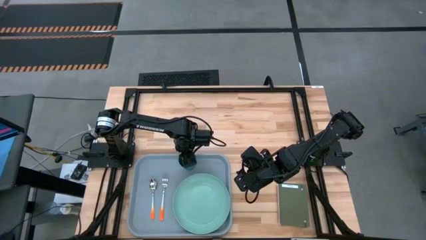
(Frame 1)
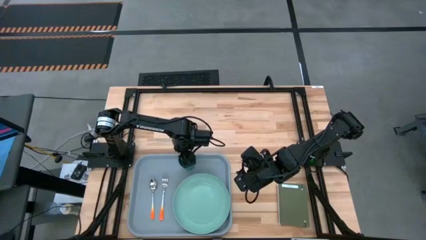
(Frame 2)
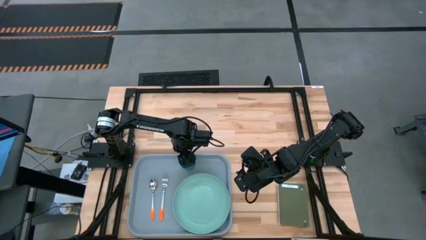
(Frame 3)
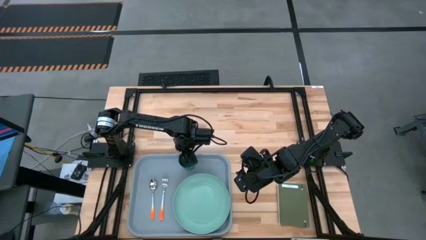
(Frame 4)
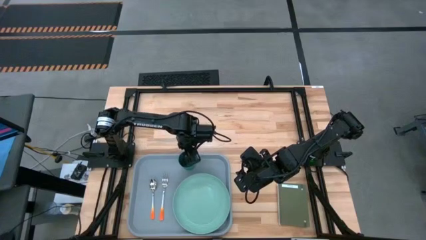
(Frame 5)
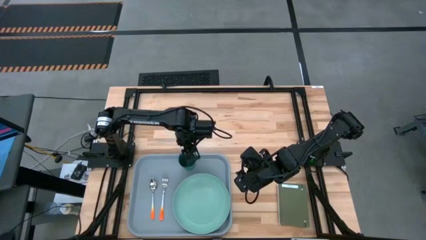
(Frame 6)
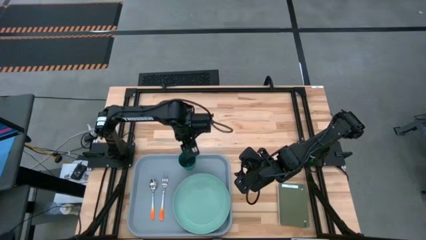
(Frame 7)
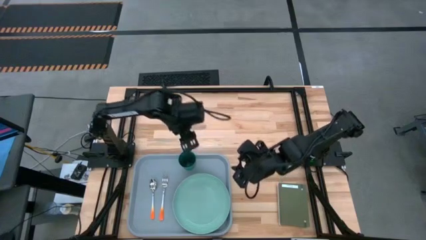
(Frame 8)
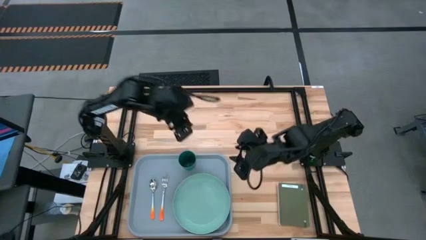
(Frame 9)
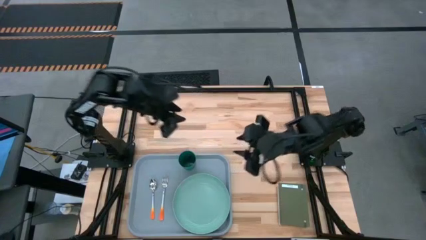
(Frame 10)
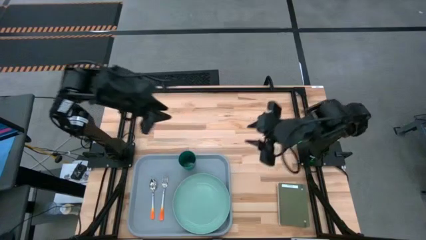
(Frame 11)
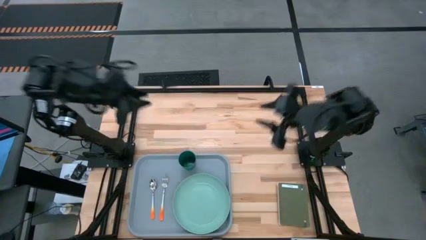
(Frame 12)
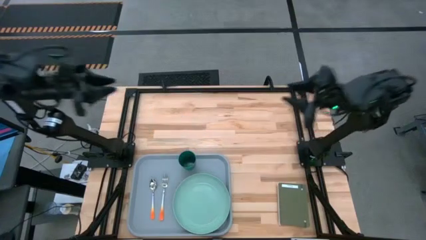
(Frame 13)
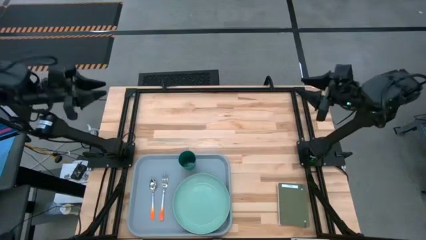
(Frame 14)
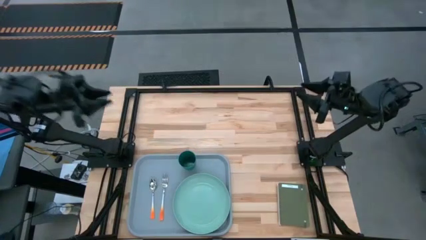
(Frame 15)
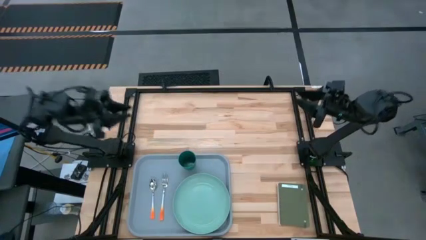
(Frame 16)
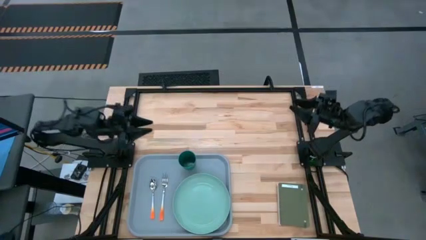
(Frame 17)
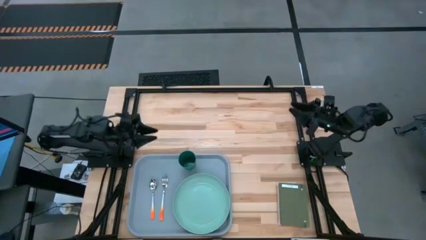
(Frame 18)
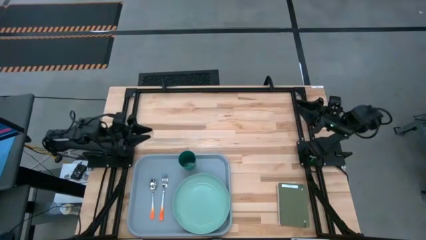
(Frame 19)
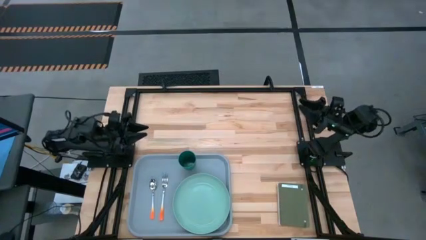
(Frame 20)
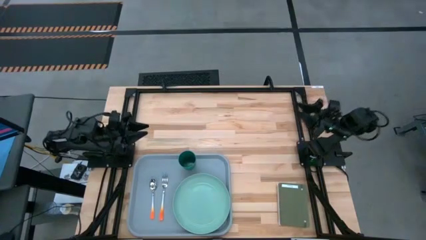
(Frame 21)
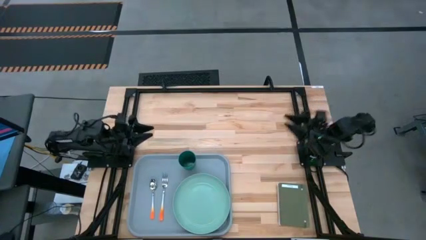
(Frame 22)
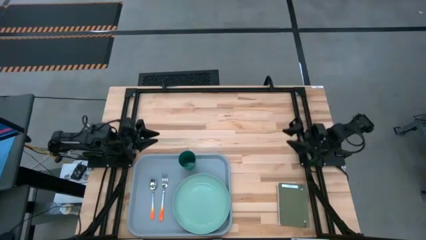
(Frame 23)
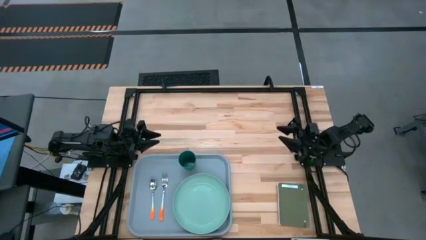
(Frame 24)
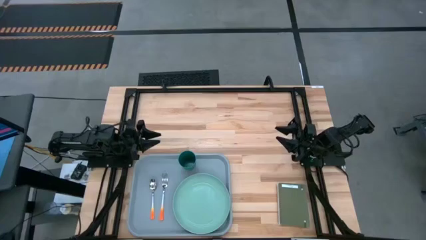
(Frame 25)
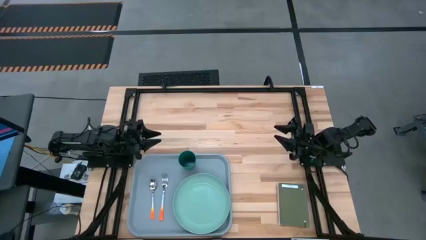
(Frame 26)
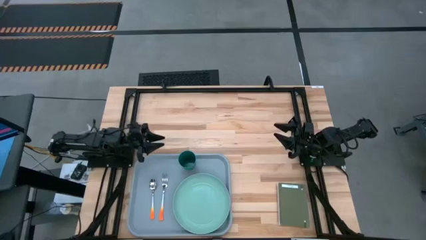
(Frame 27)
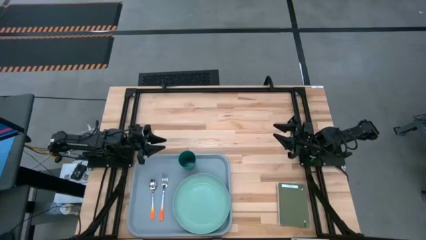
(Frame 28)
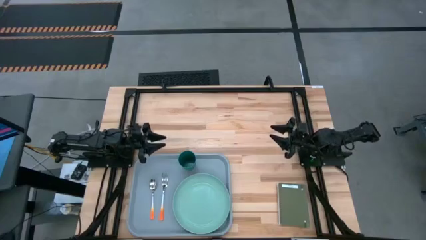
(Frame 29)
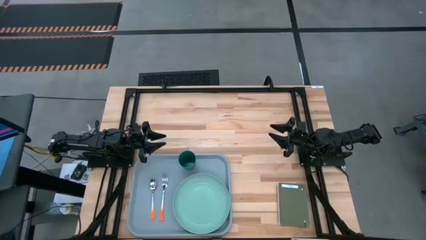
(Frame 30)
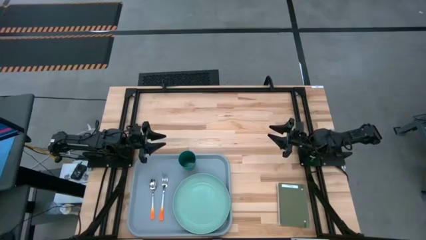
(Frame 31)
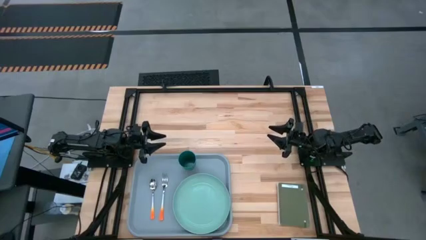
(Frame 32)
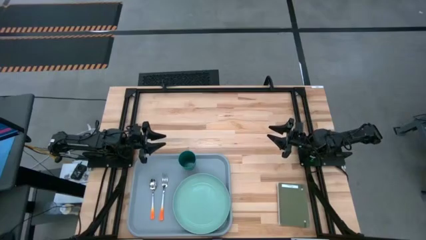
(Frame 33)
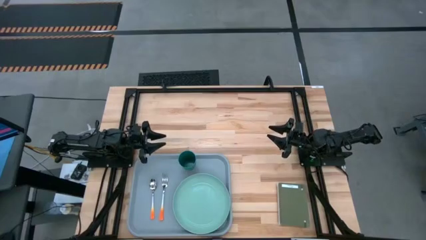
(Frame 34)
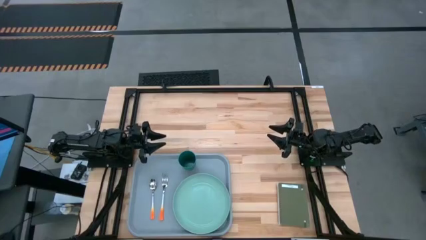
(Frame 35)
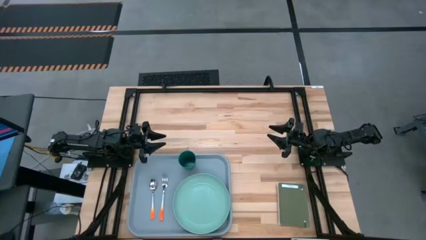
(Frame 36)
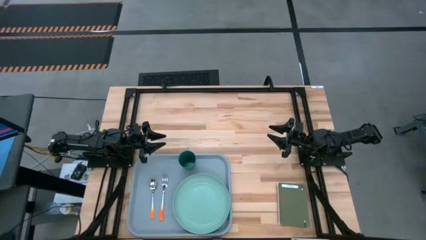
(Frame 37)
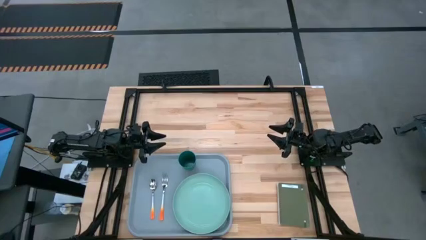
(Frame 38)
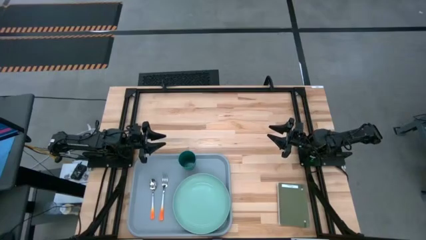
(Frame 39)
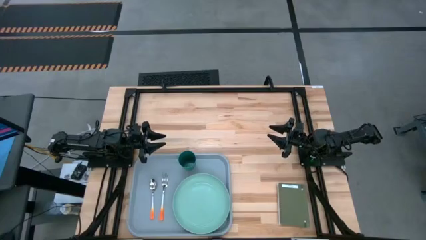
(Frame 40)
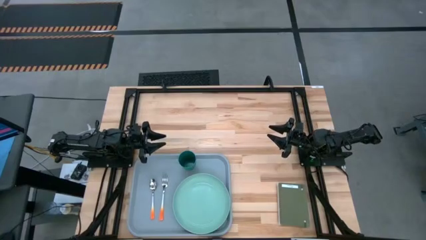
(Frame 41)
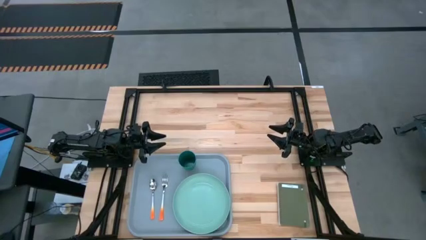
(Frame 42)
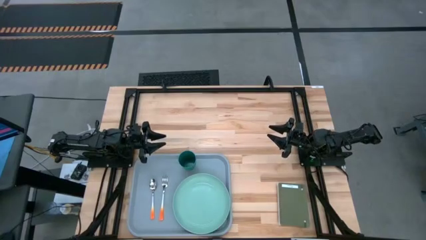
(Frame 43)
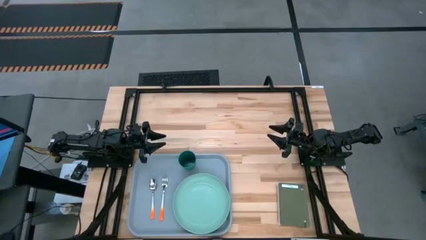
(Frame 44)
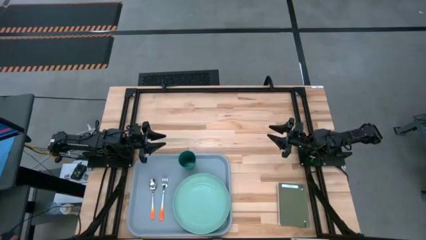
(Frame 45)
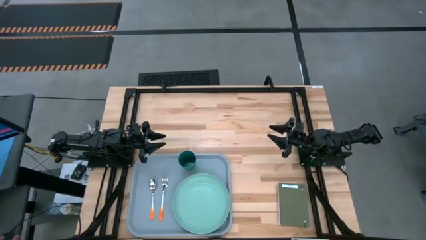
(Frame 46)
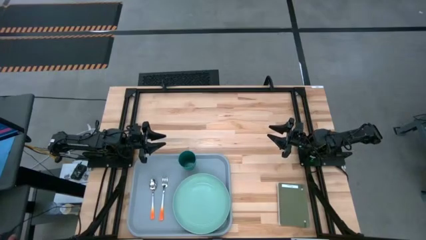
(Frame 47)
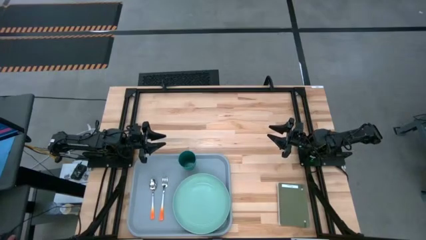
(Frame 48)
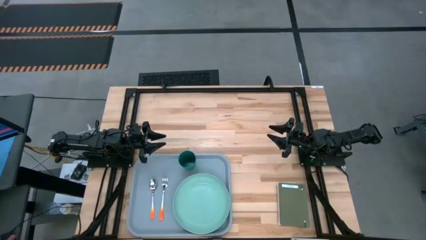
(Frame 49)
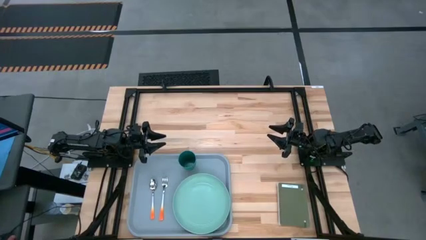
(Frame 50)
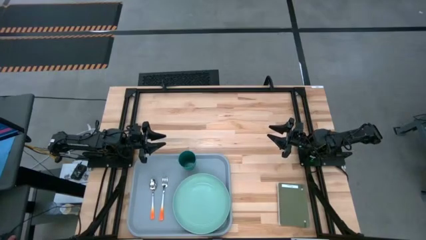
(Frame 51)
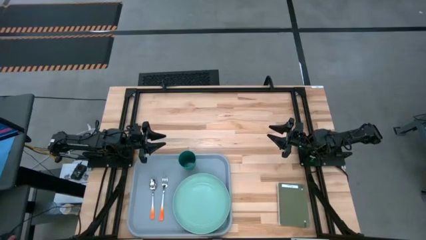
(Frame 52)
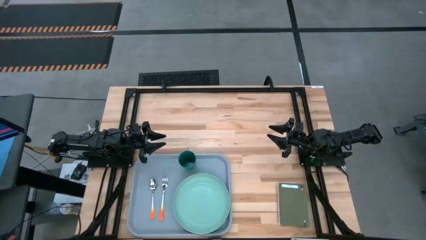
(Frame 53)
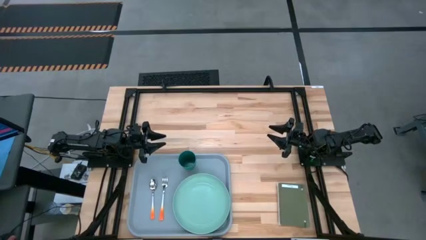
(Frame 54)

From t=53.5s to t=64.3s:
Task: Pick and place plate/cup/fork/spoon on tray
Return to Home Position

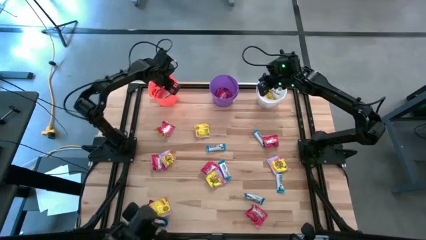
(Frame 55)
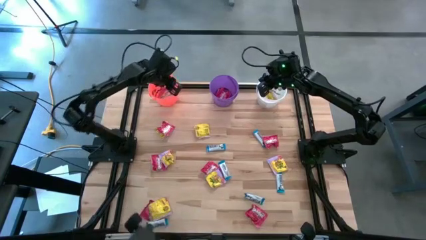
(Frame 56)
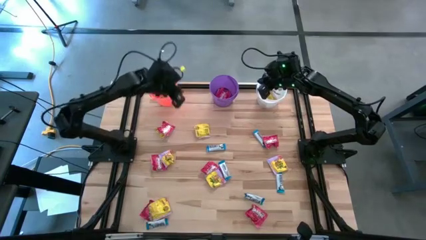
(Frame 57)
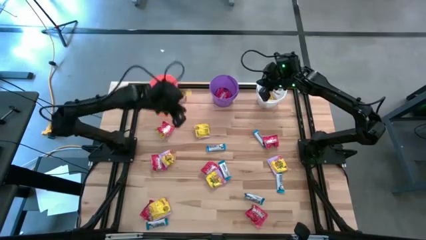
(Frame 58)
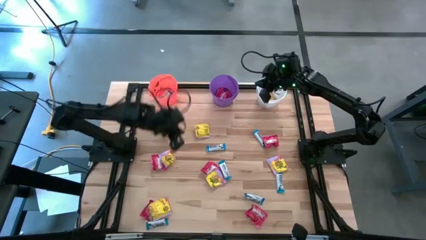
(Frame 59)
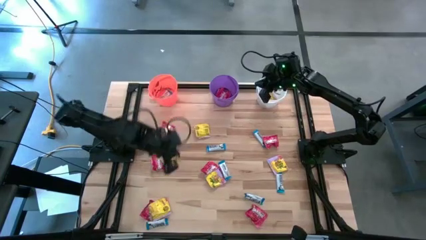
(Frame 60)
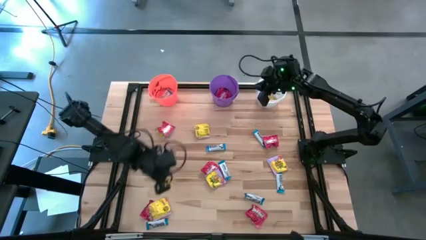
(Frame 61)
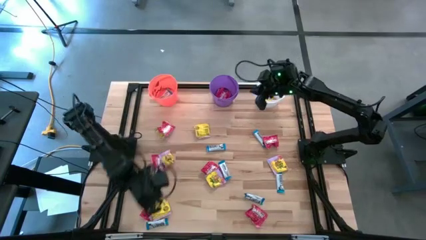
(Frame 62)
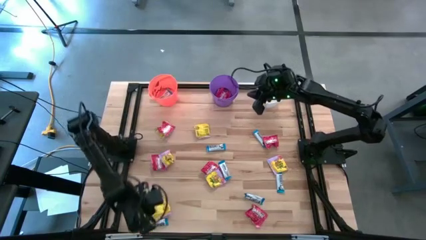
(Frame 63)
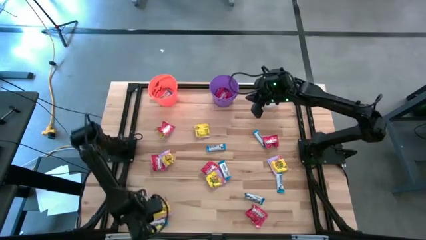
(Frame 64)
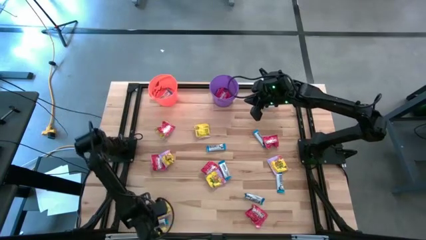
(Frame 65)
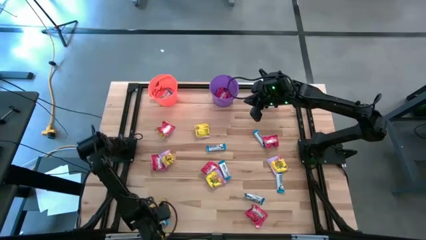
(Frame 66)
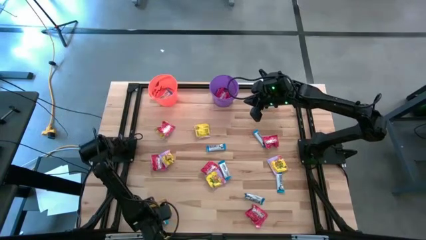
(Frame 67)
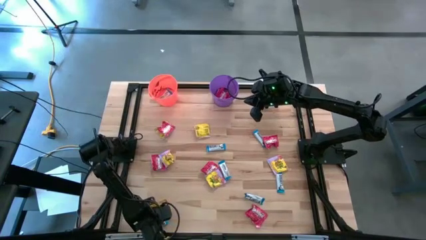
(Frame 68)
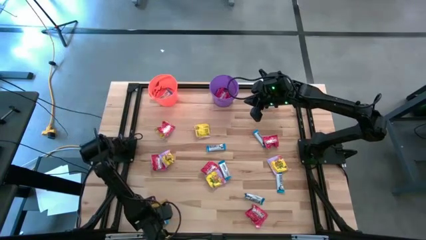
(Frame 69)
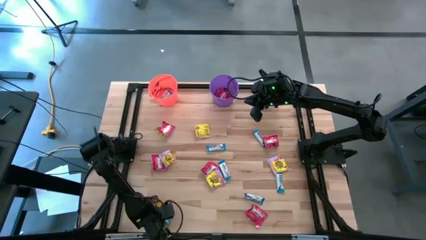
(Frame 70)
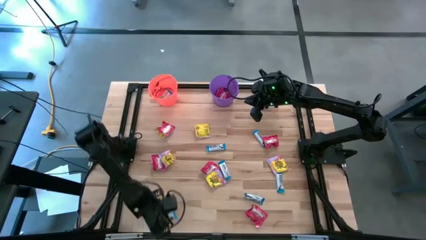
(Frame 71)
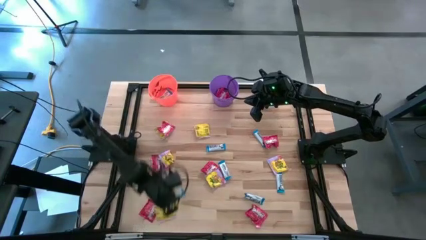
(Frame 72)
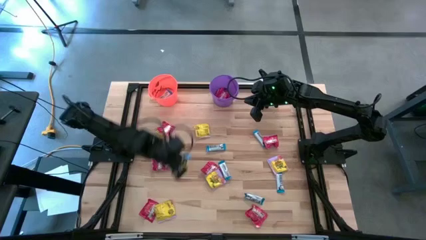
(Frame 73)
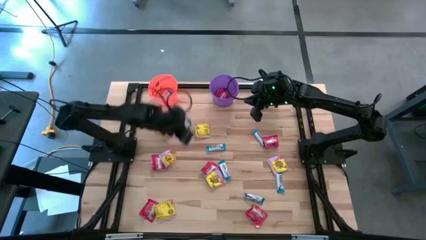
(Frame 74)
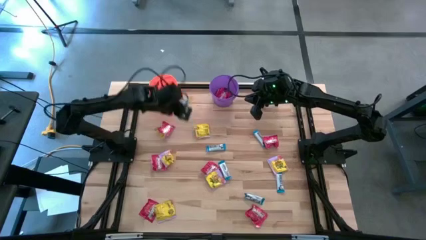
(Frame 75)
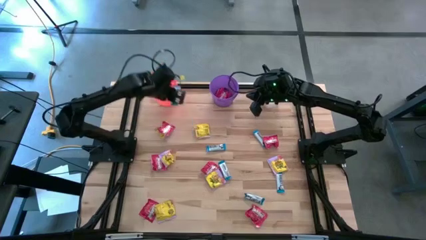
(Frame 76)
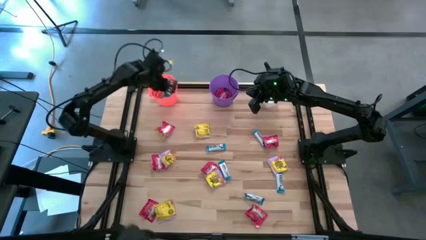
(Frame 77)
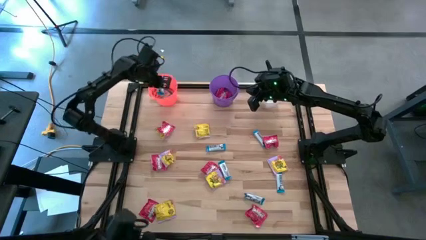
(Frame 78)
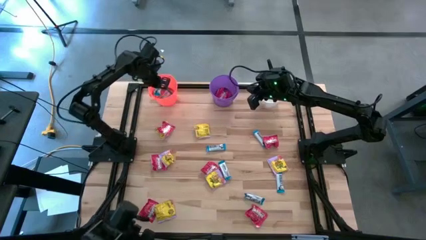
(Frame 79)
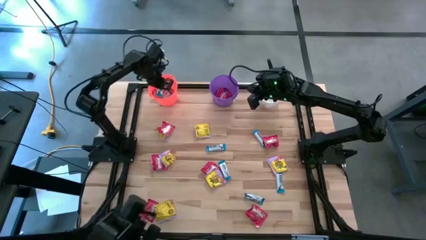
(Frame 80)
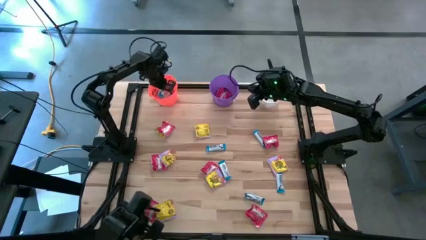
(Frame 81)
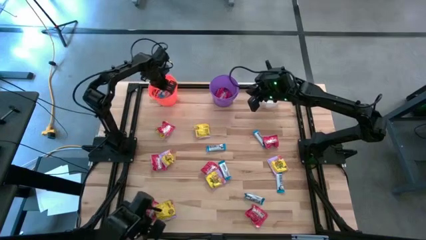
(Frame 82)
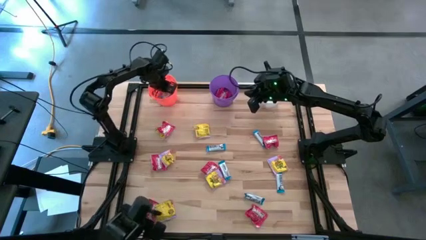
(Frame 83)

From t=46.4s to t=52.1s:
Task: Sort candy
Put the white chocolate bar into the orange bucket
